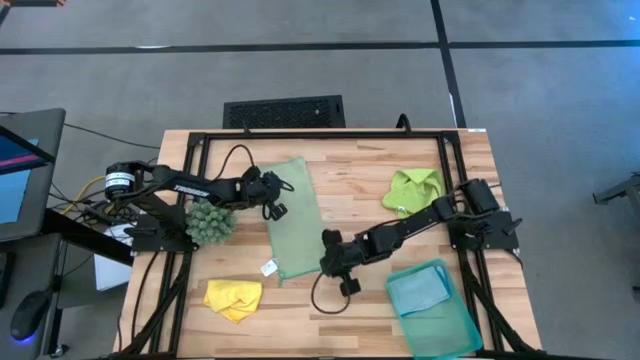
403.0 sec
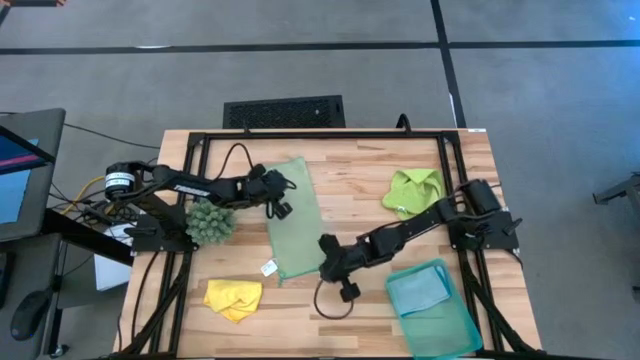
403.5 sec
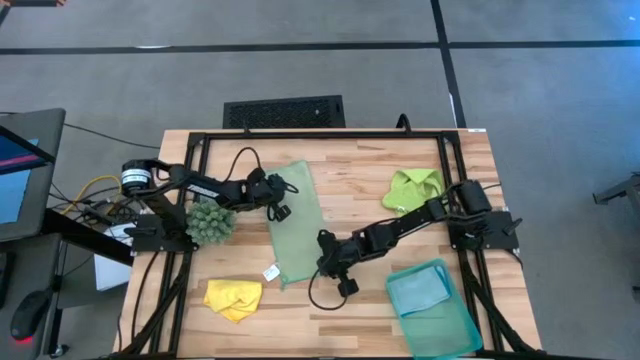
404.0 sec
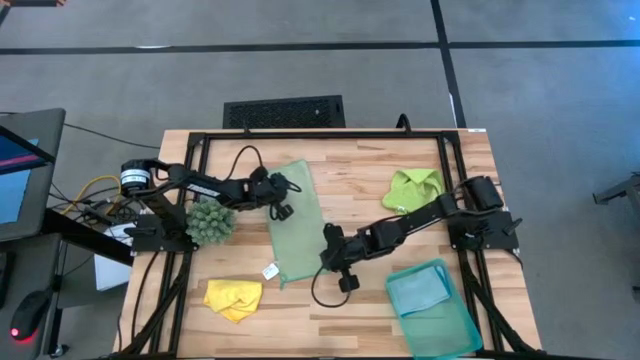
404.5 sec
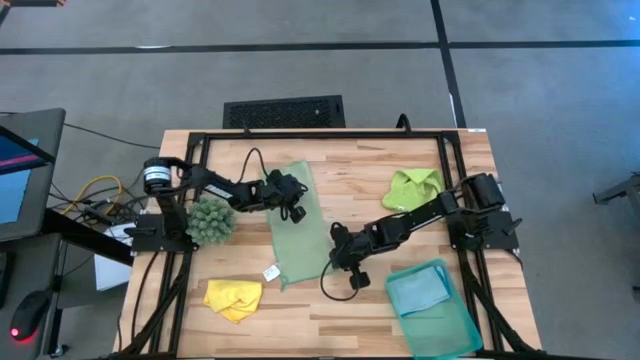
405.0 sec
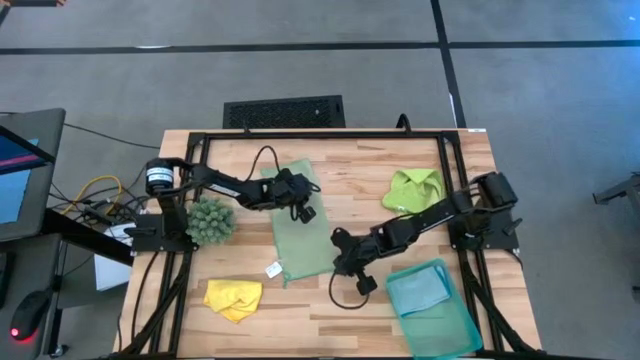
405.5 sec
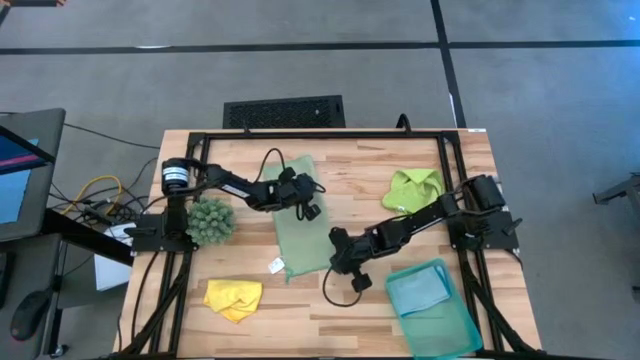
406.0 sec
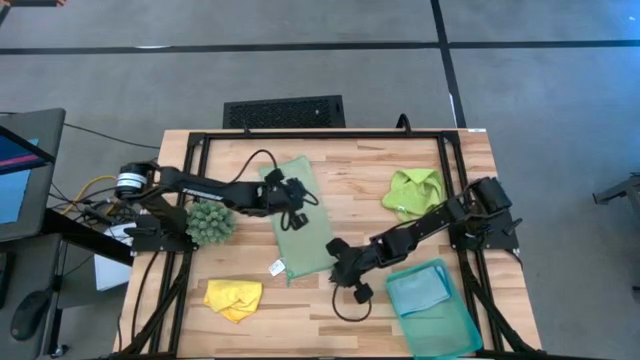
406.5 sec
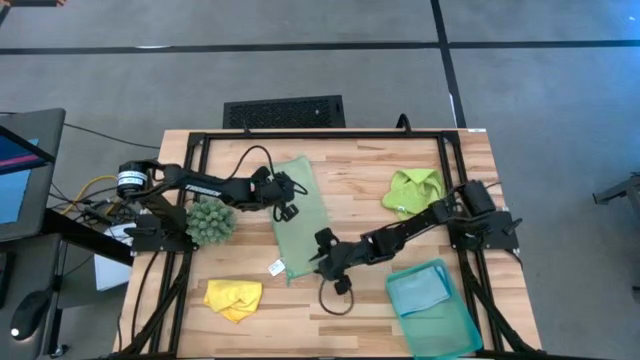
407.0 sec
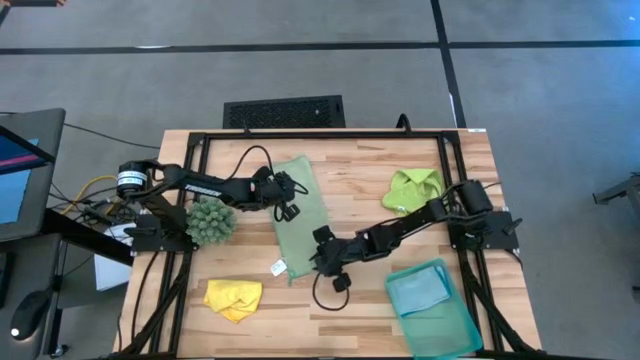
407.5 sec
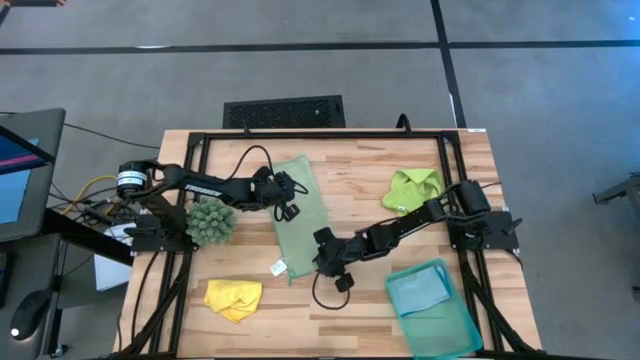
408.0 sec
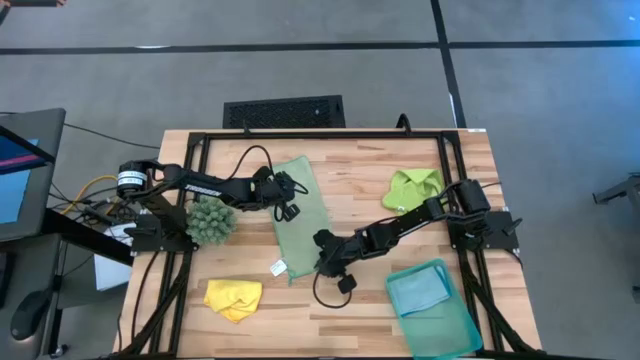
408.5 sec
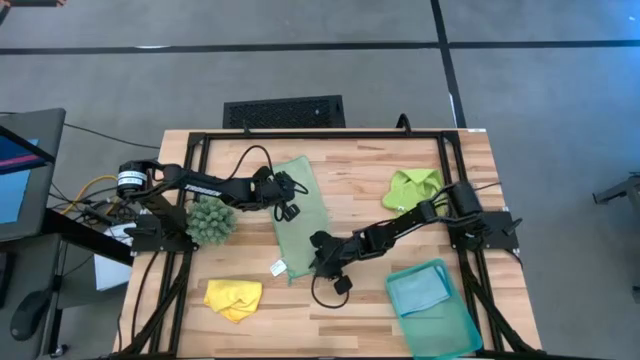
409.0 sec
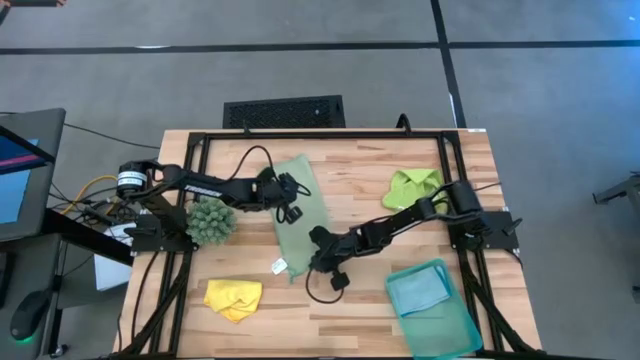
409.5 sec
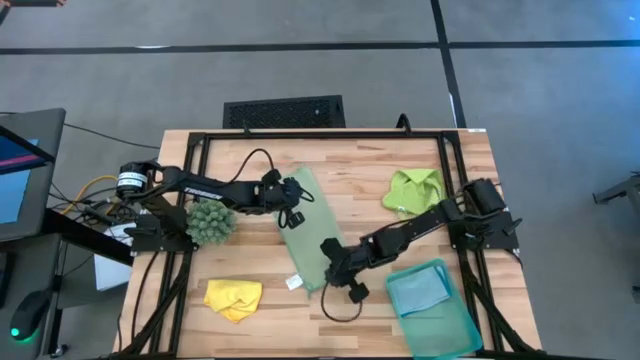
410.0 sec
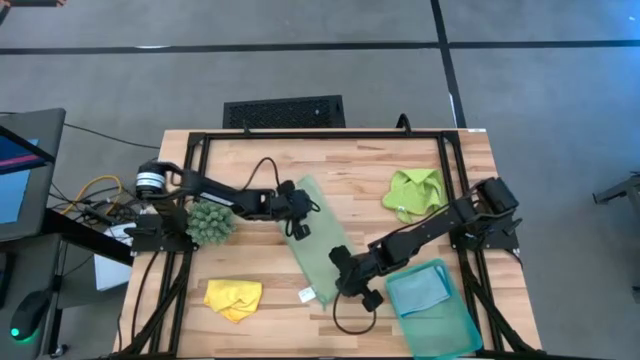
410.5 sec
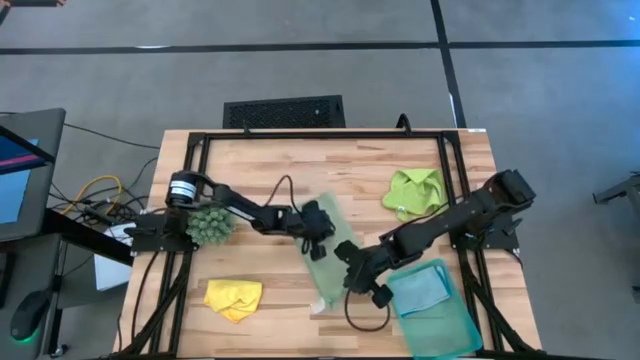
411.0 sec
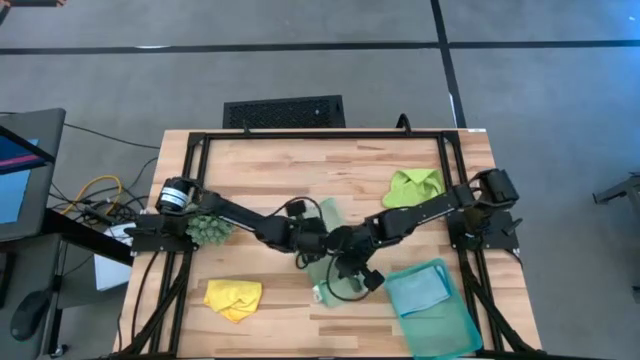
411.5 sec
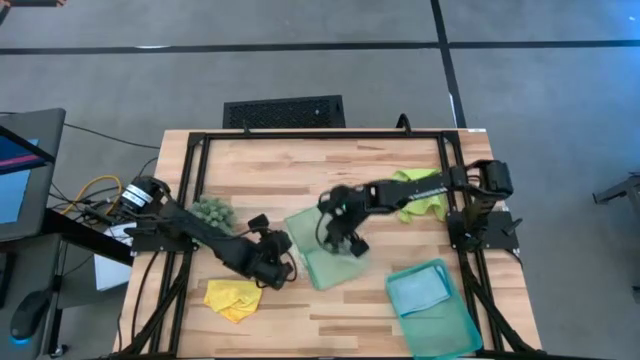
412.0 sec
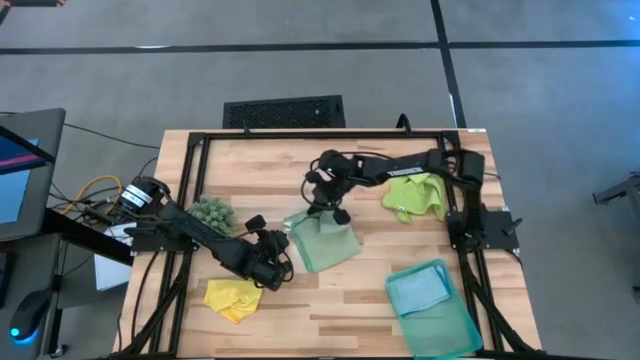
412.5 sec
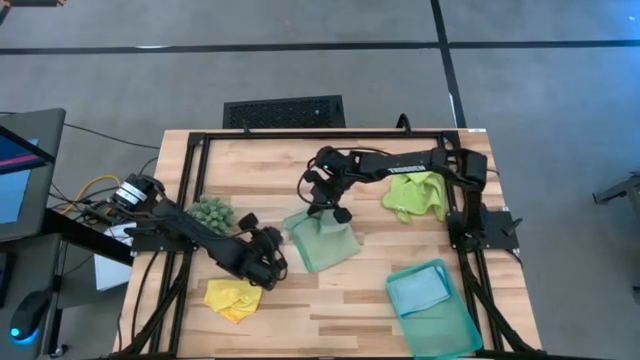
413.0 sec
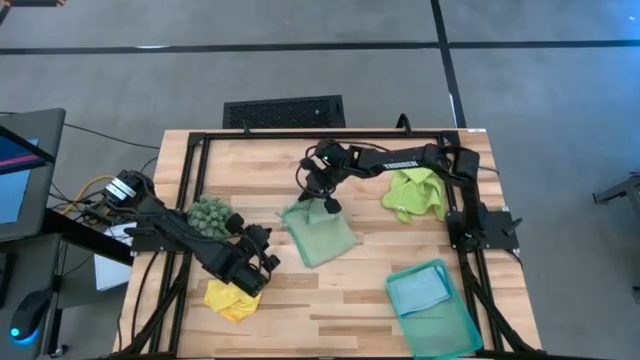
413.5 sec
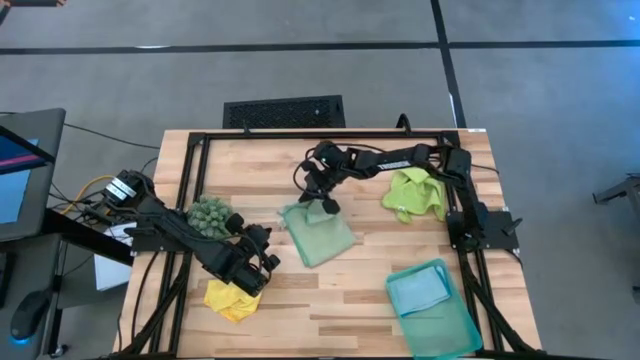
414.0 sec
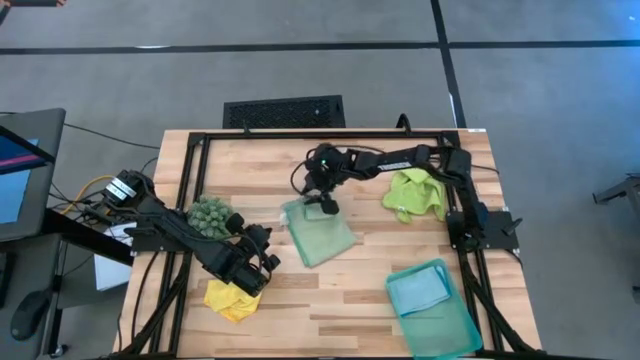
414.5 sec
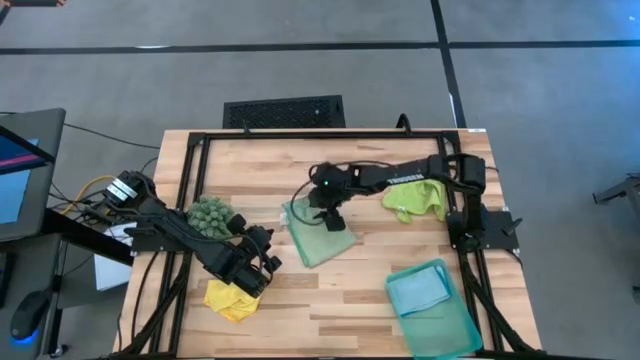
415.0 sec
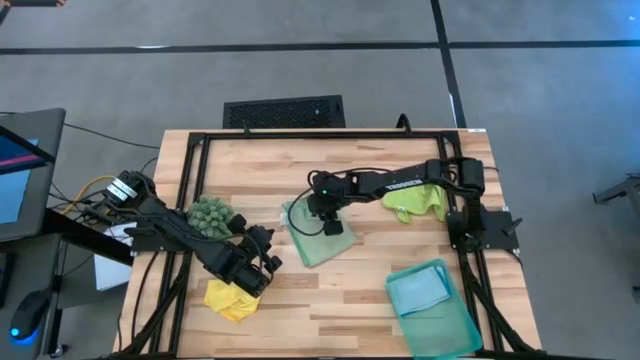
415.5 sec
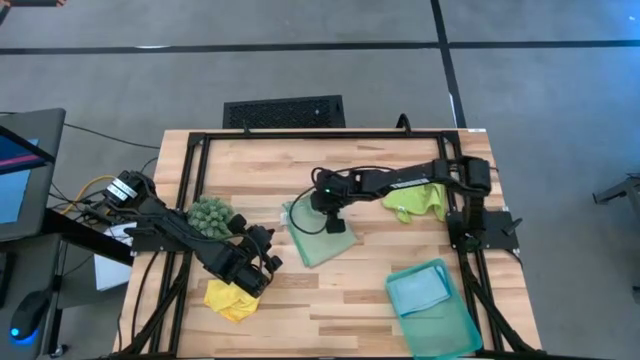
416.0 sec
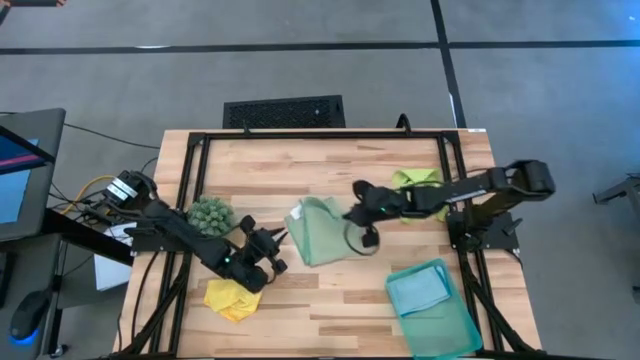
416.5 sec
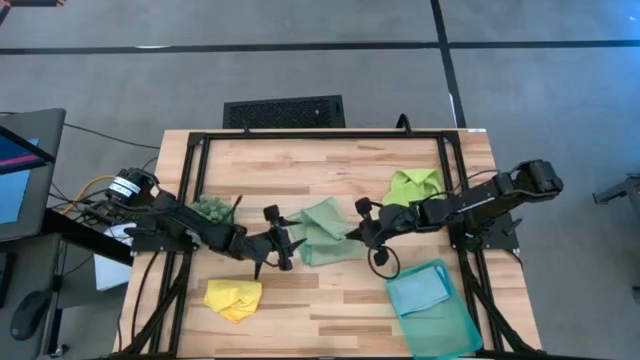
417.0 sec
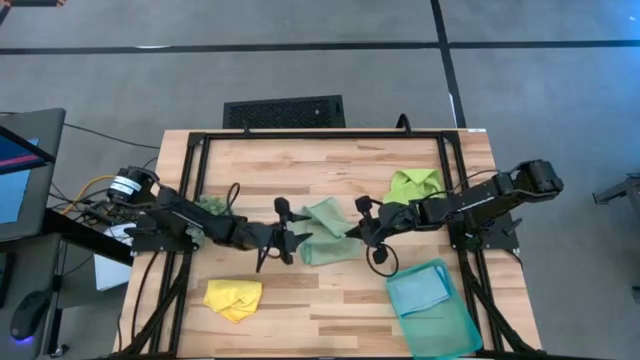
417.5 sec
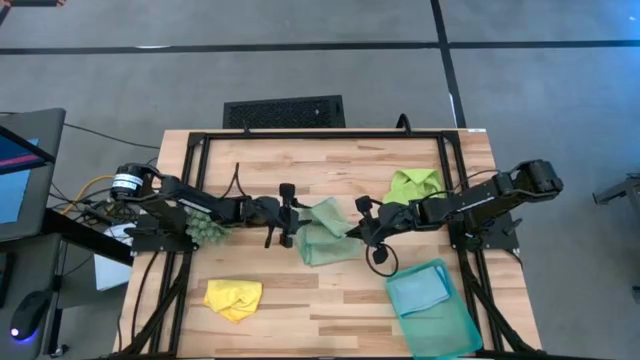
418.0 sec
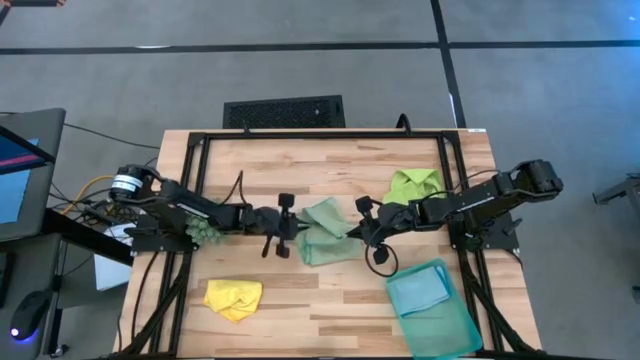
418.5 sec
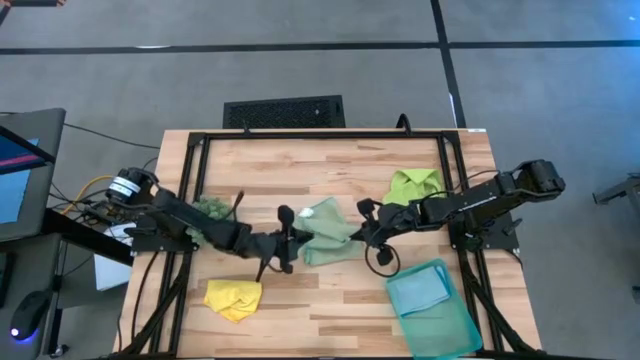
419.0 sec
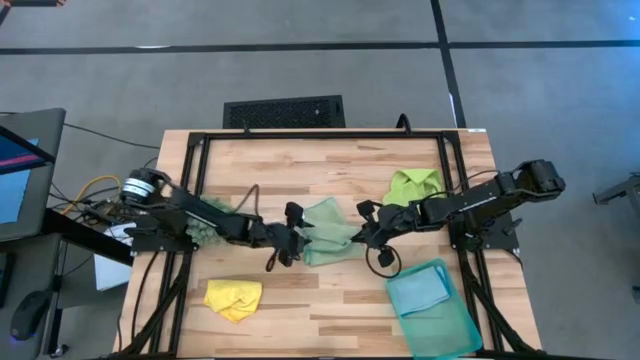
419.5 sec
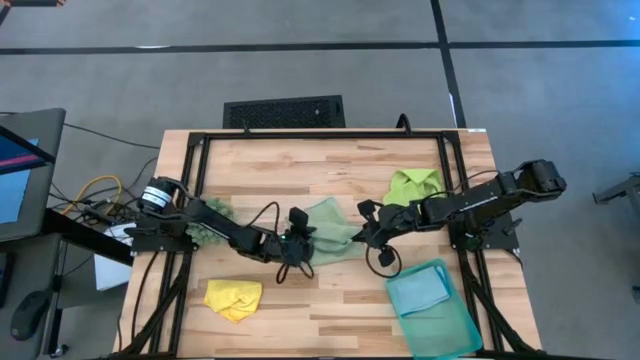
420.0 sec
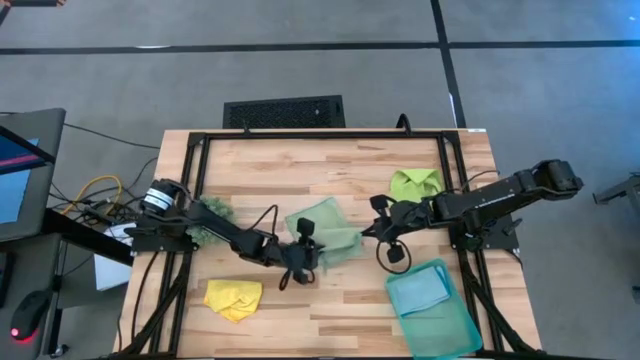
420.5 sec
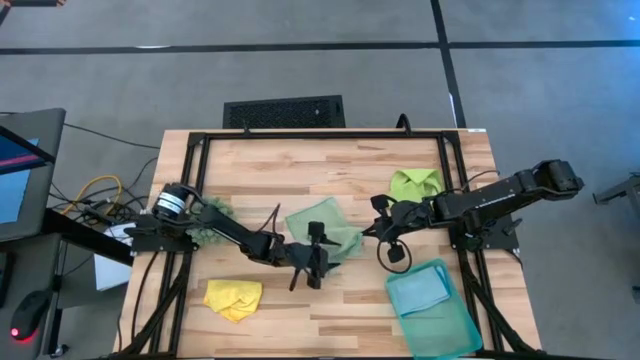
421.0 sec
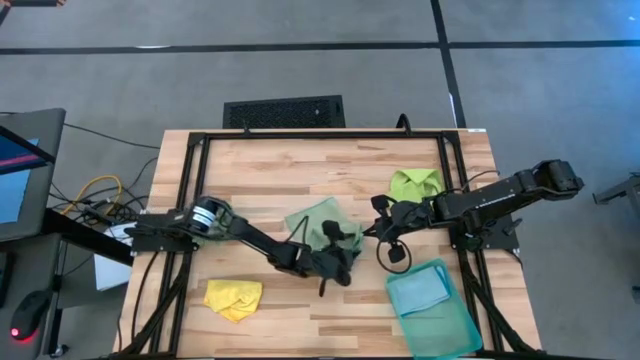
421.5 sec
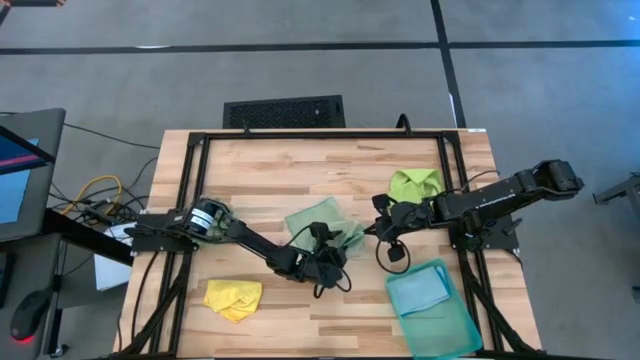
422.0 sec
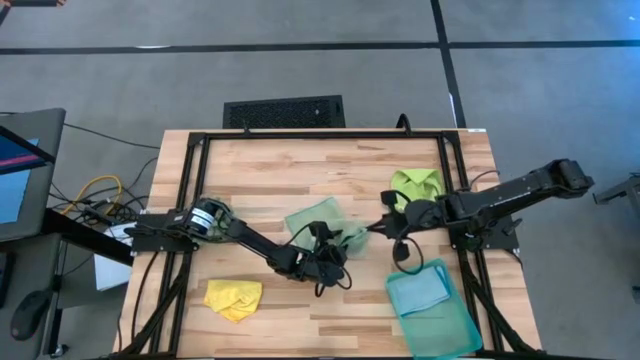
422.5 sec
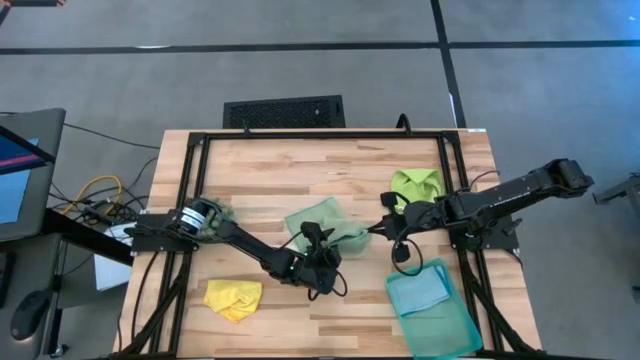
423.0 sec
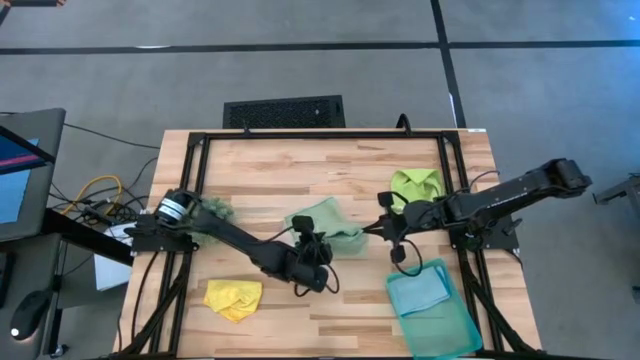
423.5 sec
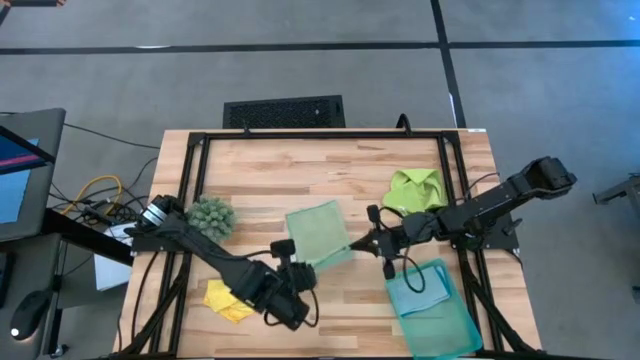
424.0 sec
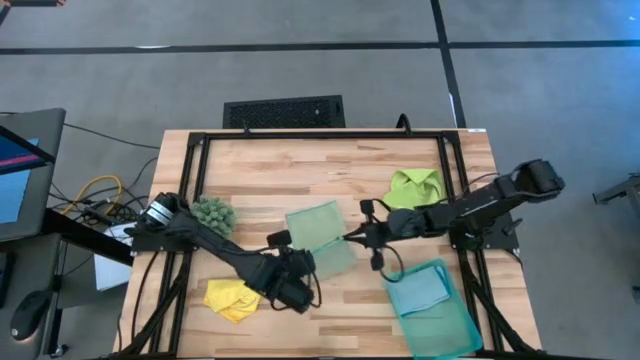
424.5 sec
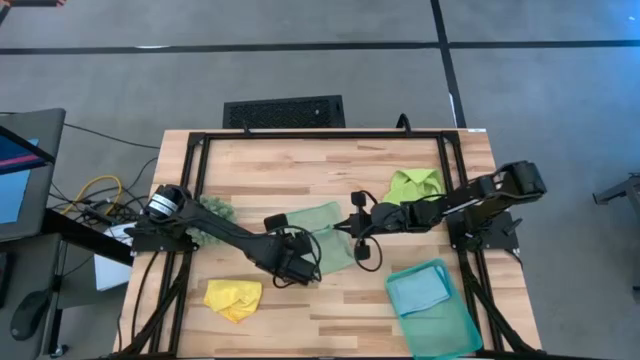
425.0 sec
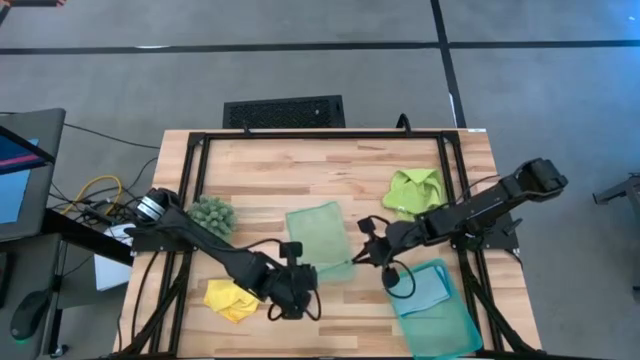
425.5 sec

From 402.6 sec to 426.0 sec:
Task: Fold microfiber towels
Fold the green microfiber cloth
